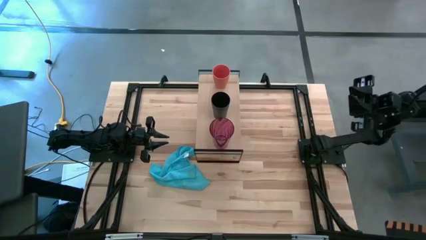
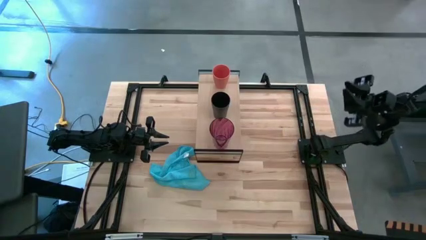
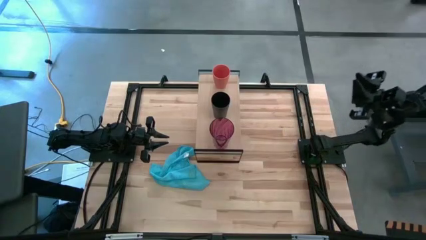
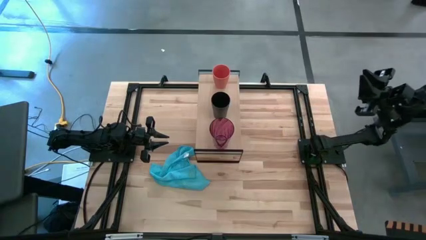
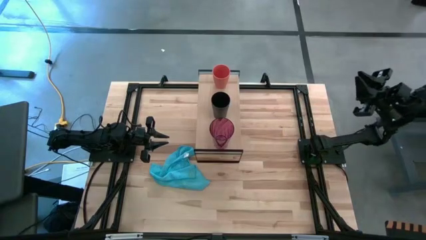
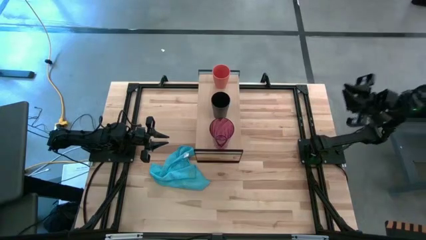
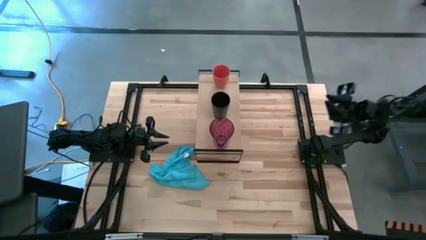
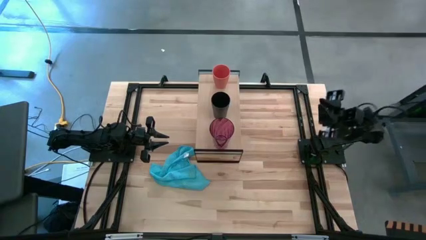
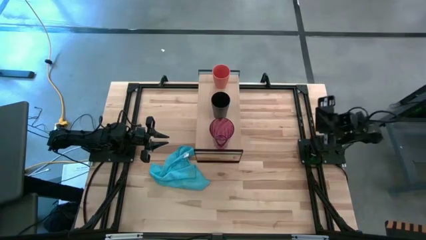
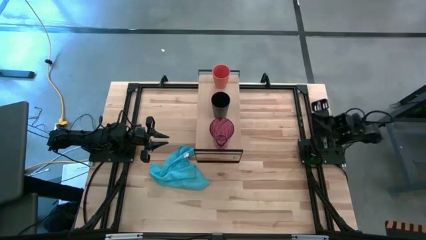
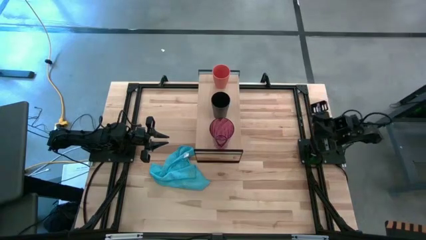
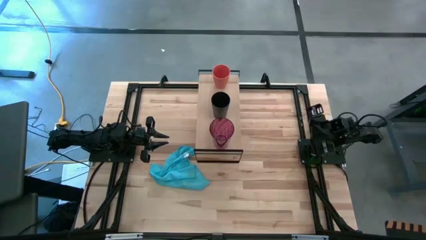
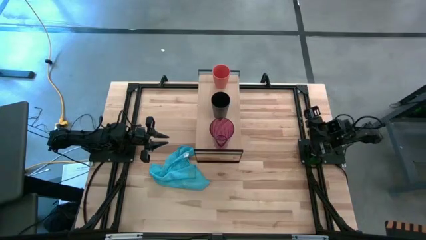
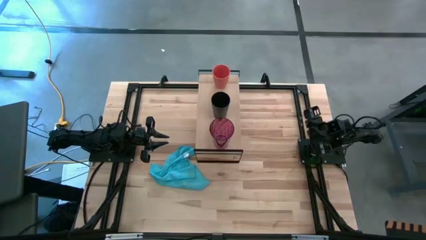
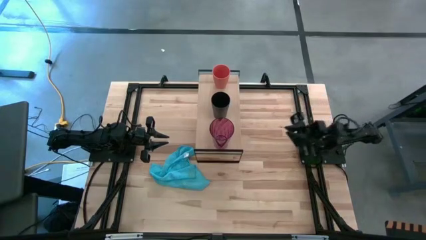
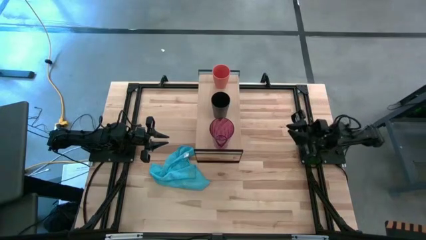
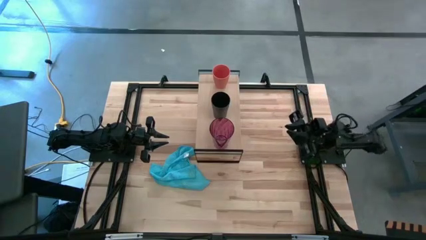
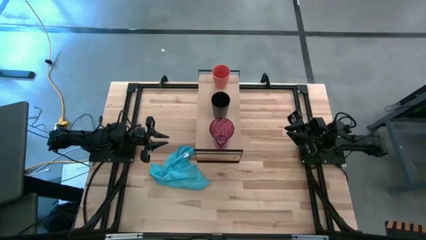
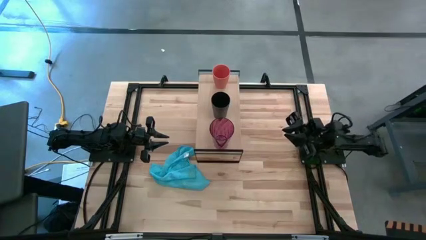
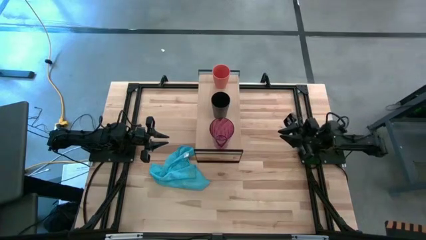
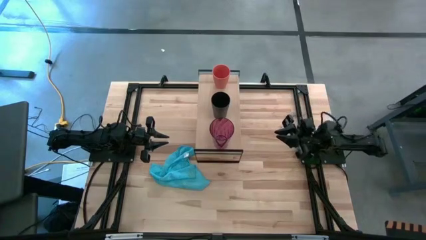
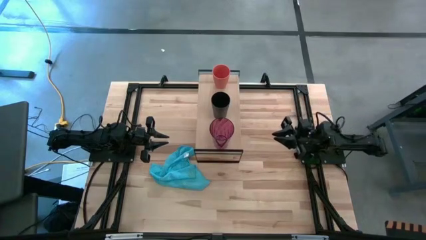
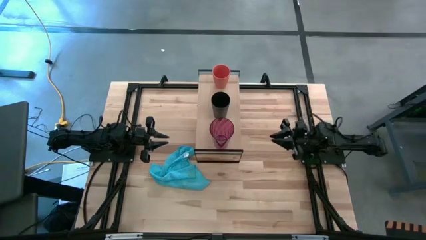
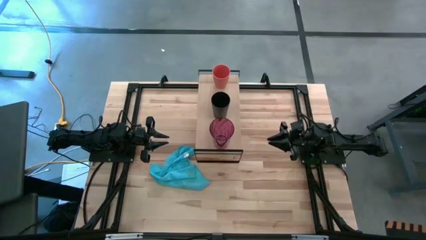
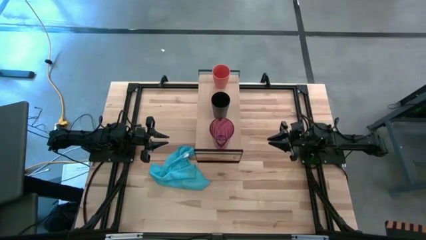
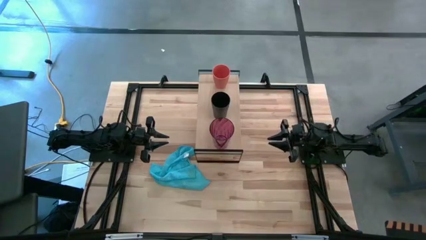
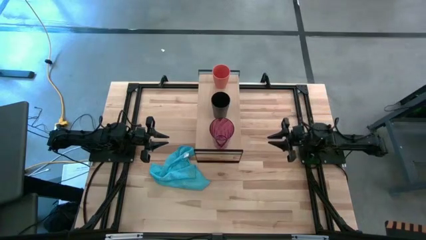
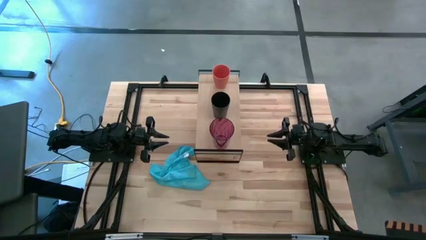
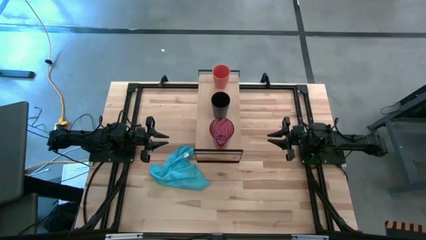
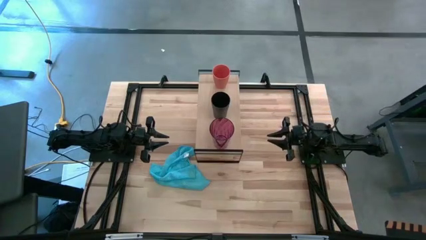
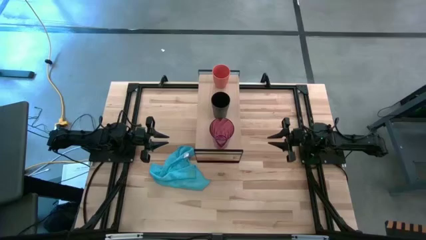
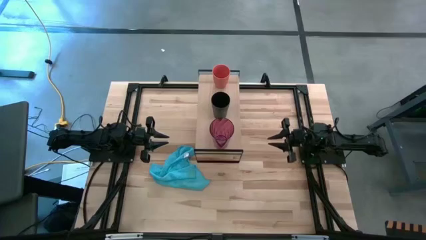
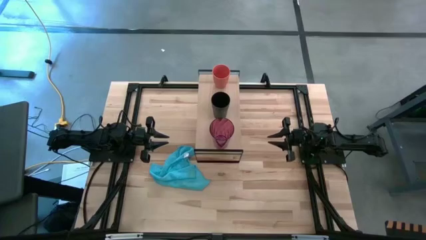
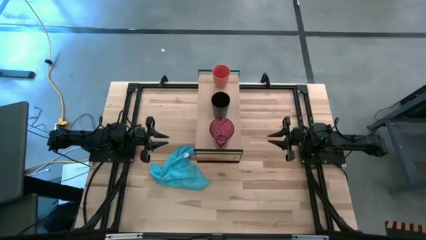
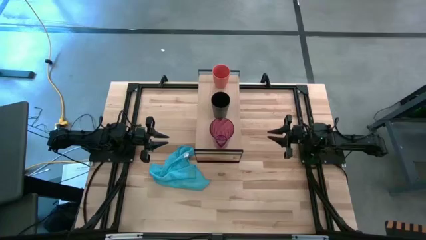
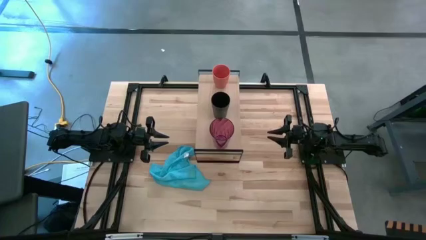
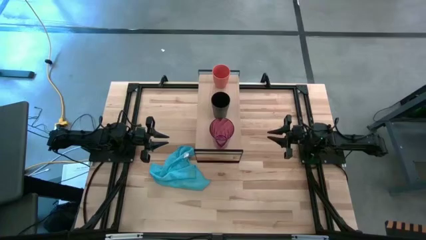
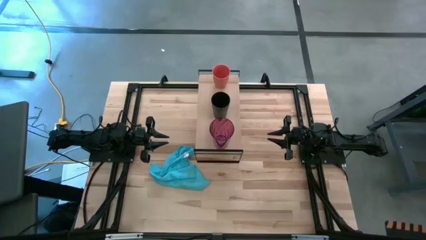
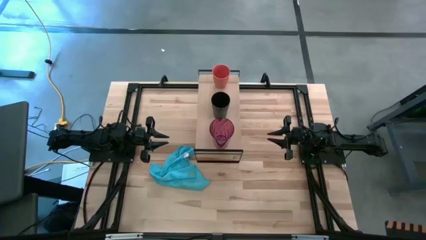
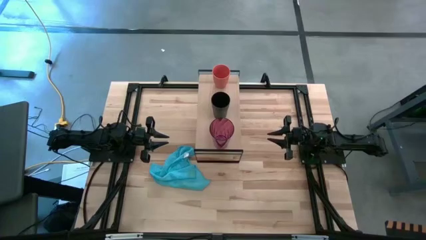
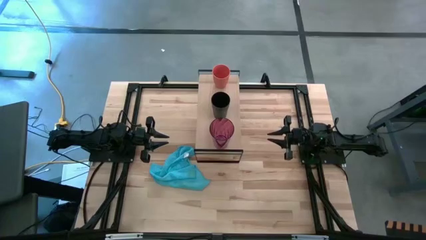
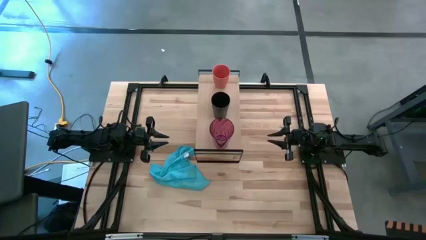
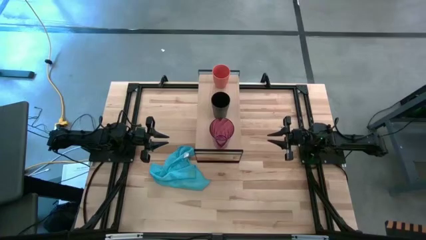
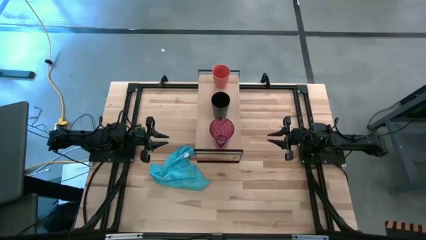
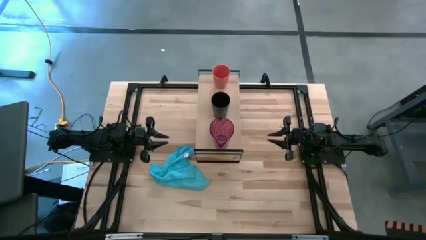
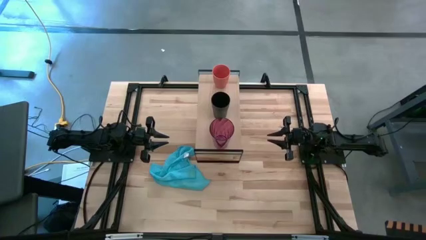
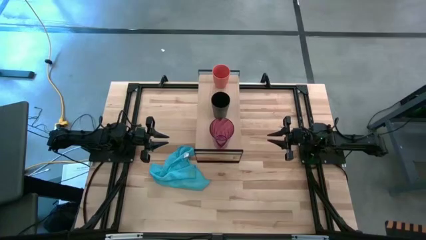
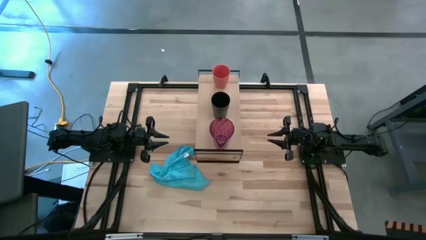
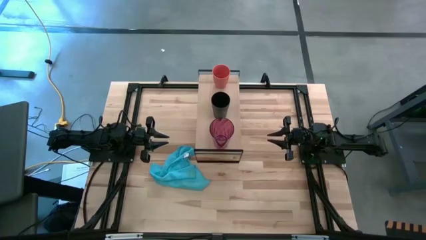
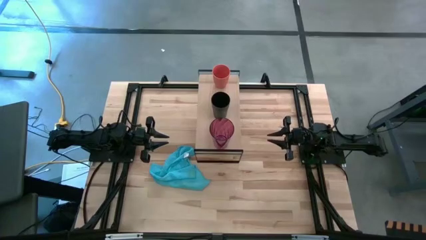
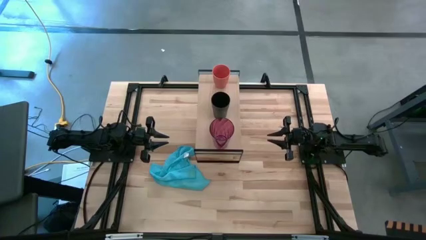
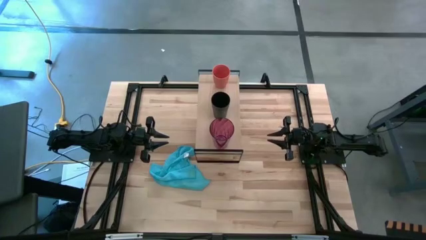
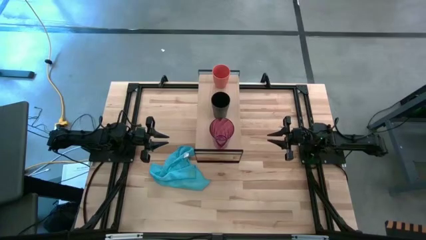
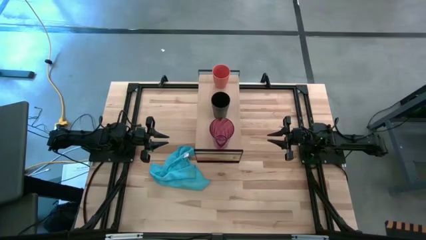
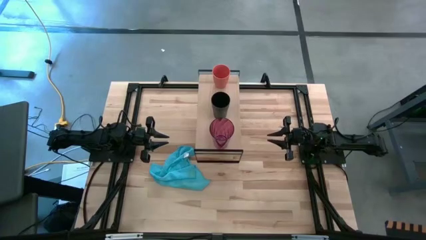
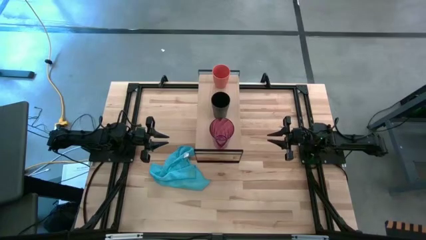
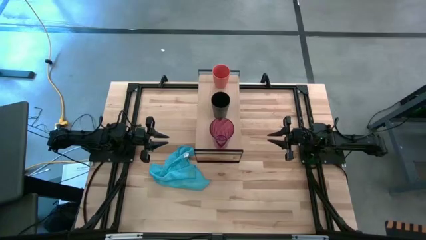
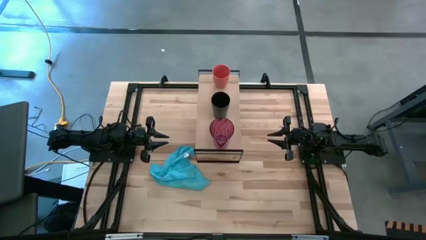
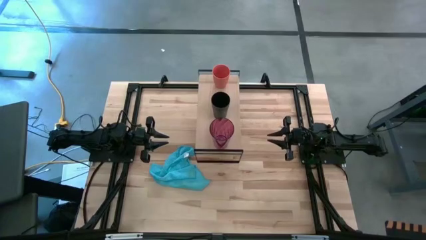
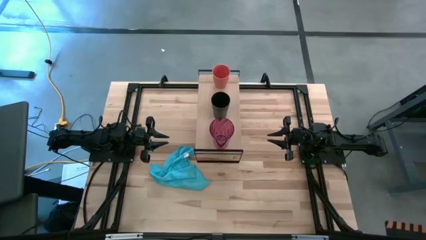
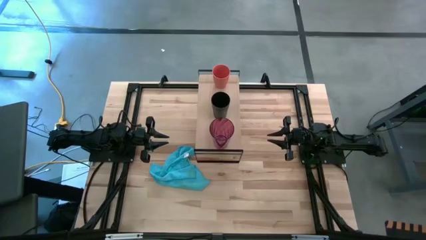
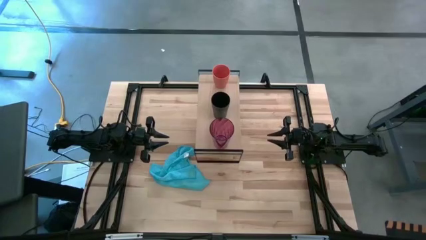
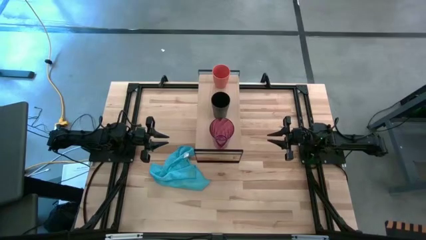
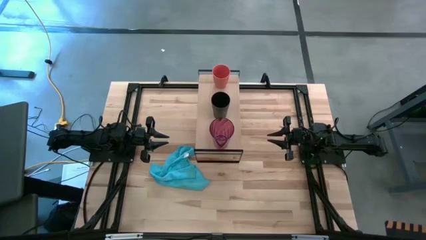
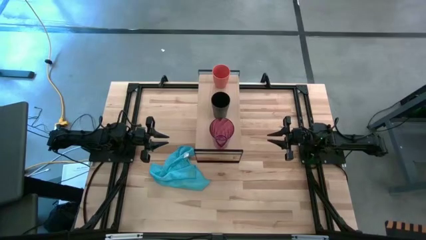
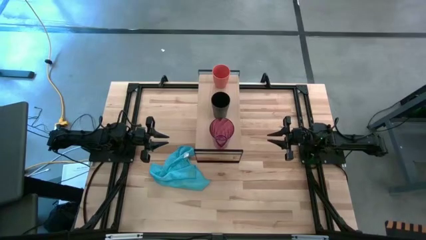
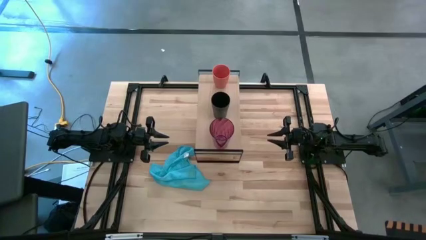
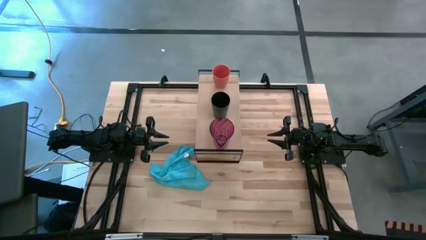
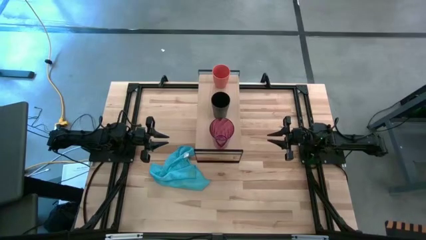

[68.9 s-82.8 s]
Task: Stack small to large cups/mugs on shelf
Return to Home Position
